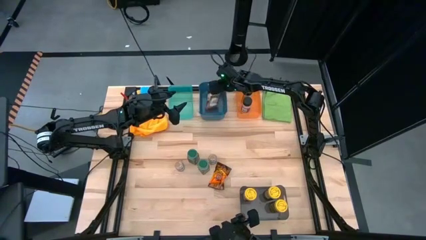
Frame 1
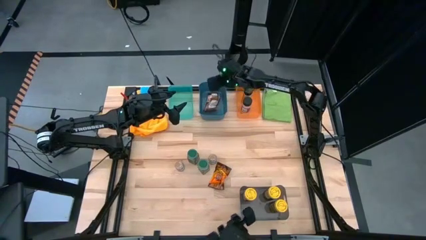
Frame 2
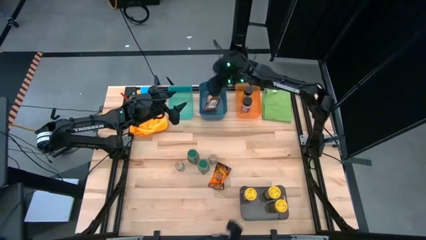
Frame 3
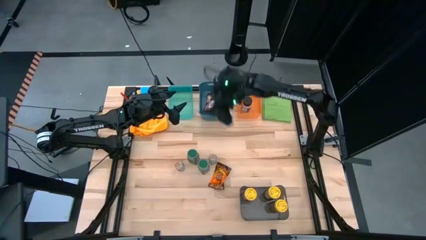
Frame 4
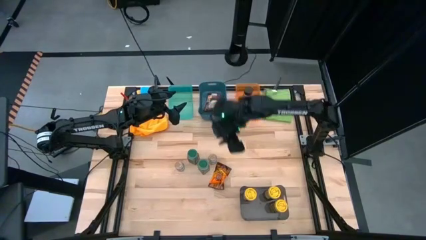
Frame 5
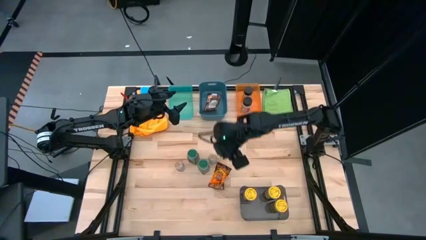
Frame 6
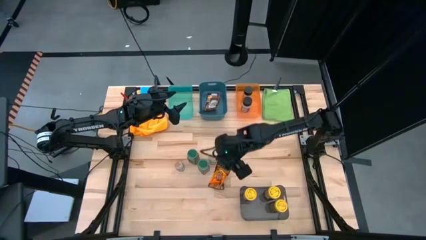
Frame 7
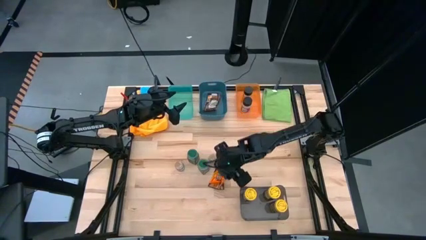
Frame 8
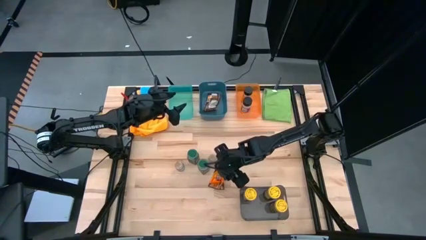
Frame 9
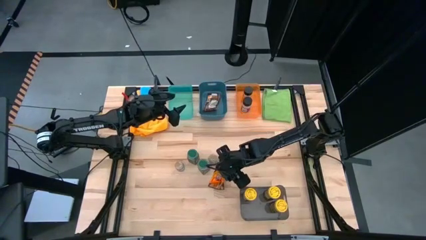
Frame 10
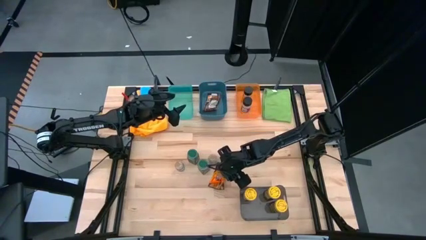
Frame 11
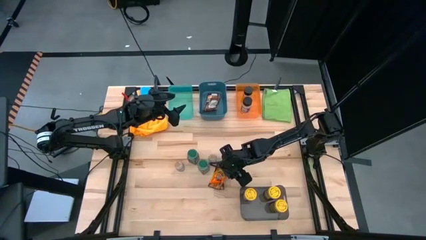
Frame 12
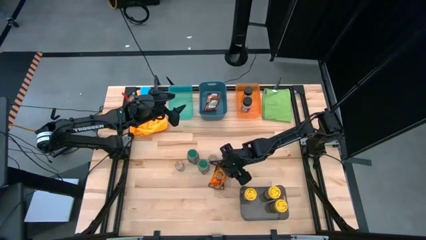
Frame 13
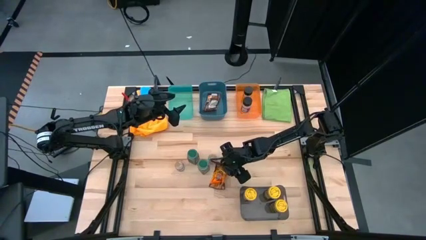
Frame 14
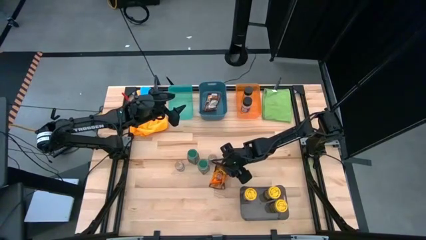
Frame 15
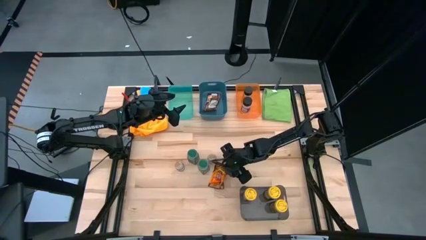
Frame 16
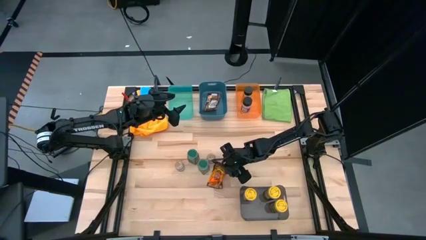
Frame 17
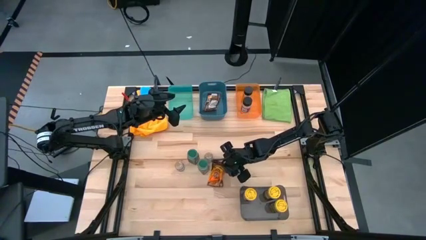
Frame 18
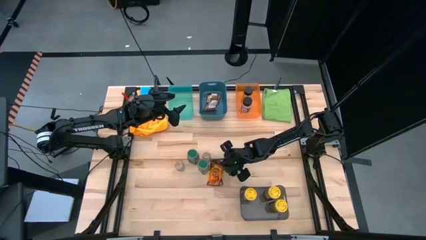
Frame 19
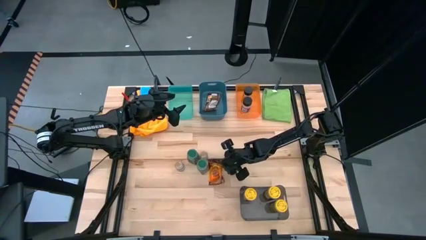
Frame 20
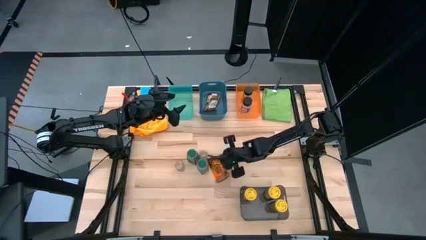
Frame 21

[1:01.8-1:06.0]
Task: Sort spices by type
Put the brown seasoning pack into the blue bin

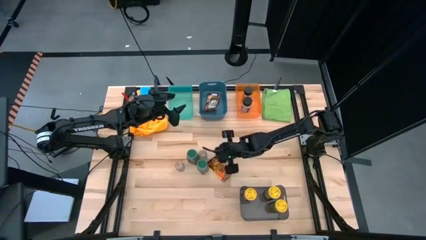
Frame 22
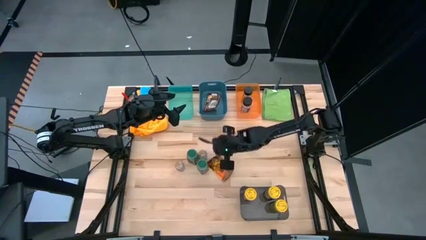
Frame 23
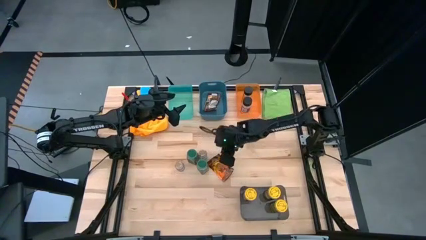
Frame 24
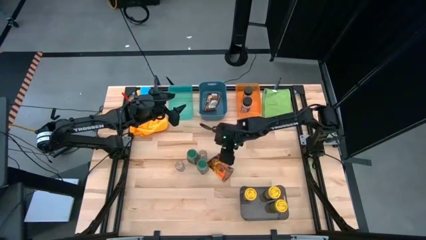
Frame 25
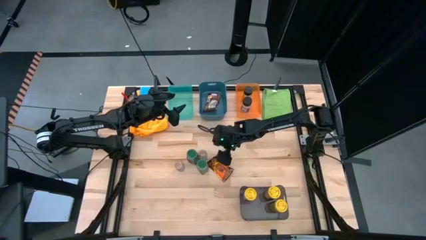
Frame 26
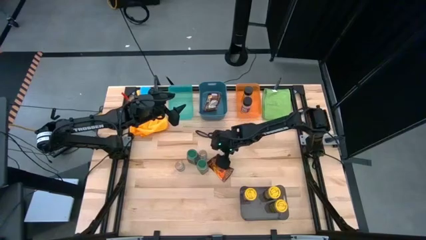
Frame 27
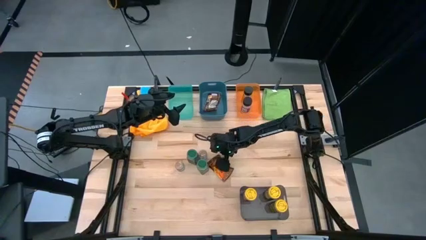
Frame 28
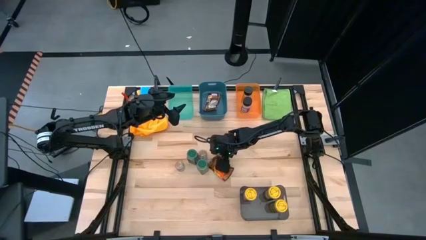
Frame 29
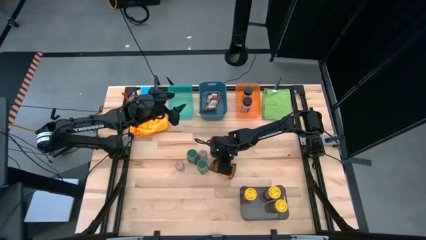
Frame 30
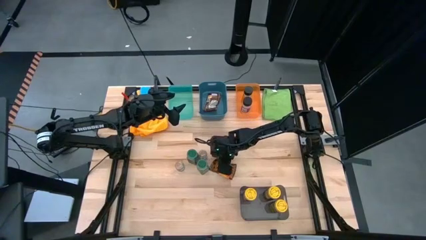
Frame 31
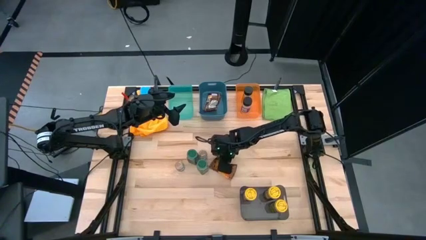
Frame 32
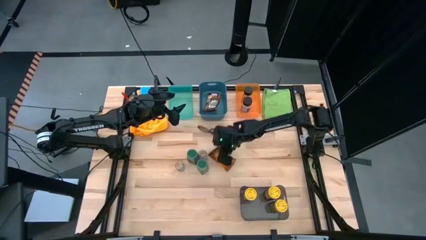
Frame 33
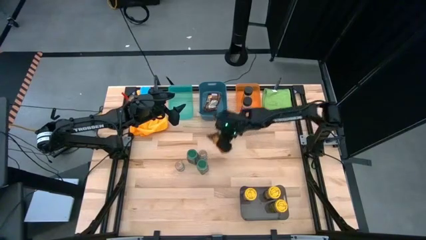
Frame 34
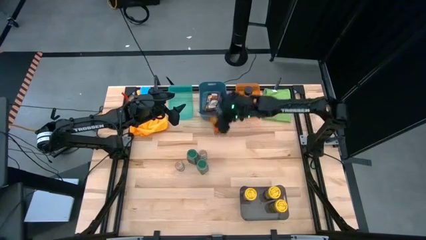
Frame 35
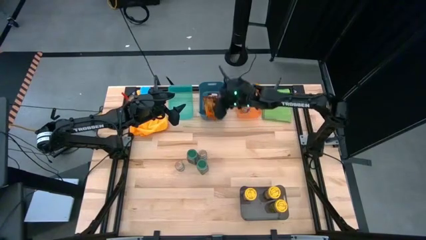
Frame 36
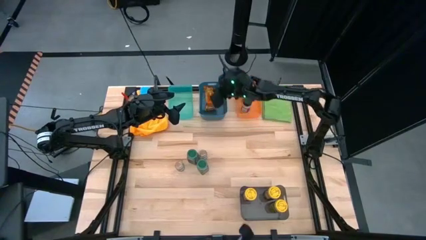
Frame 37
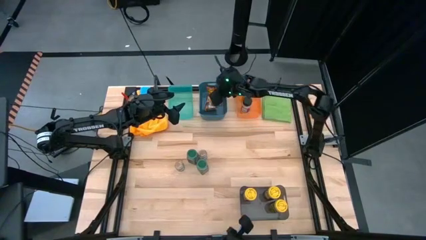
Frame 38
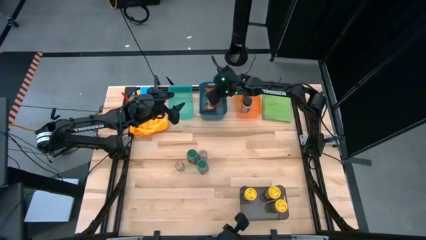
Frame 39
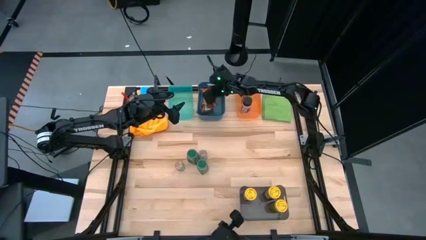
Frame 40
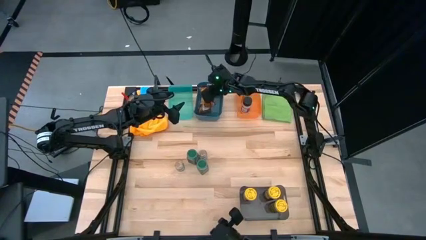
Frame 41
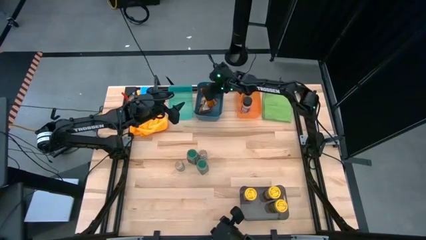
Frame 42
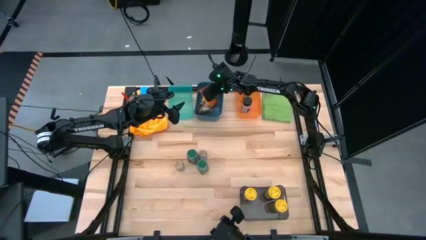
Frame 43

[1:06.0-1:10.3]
Put the orange seasoning pack into the blue bin

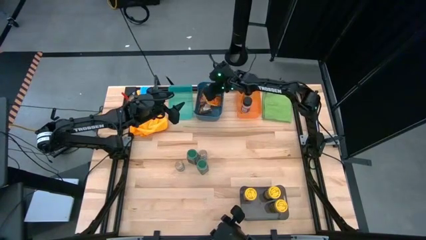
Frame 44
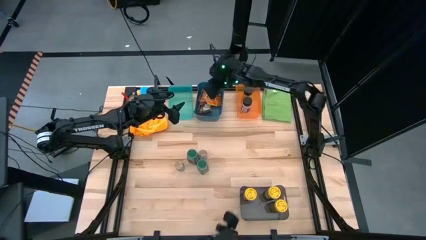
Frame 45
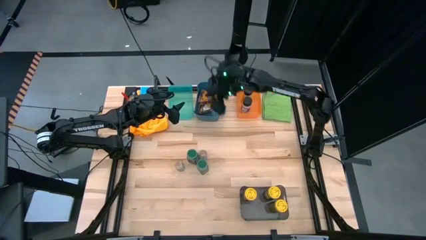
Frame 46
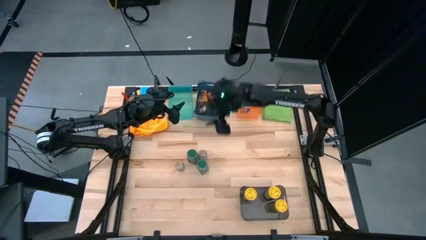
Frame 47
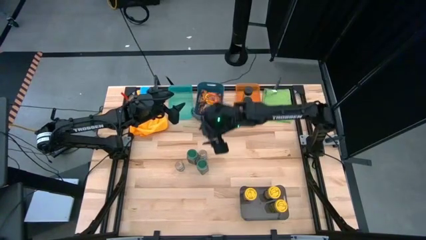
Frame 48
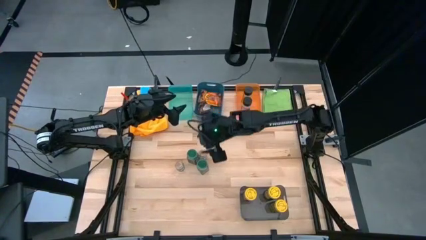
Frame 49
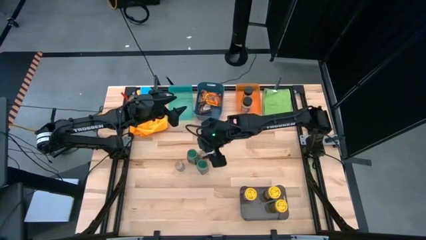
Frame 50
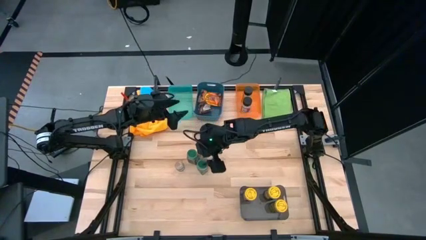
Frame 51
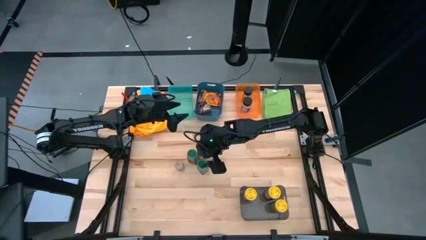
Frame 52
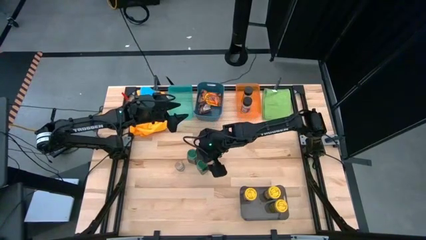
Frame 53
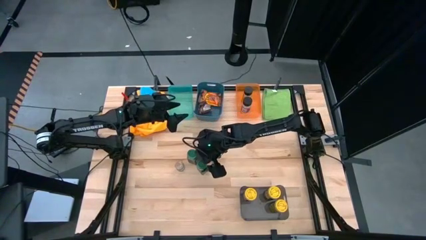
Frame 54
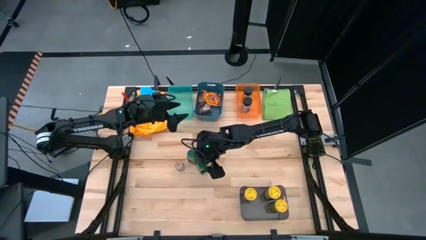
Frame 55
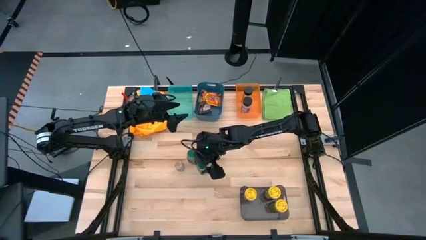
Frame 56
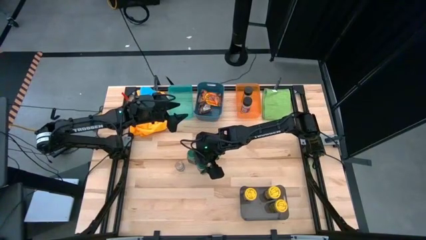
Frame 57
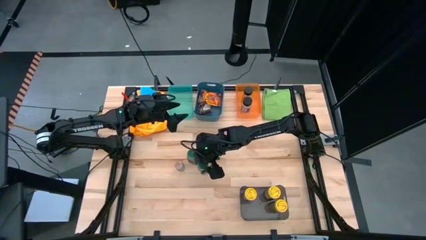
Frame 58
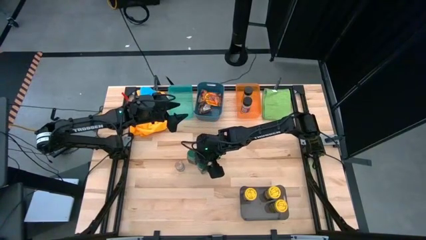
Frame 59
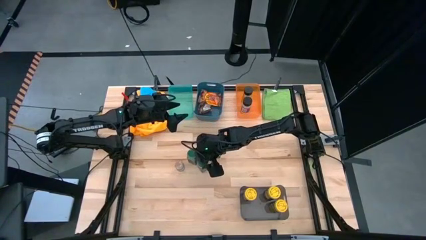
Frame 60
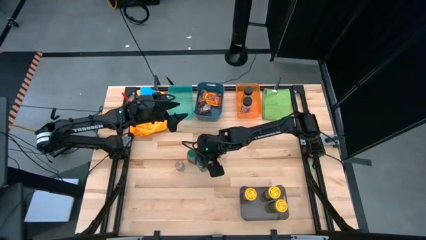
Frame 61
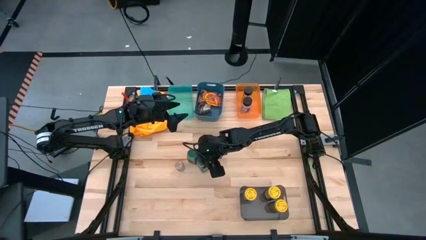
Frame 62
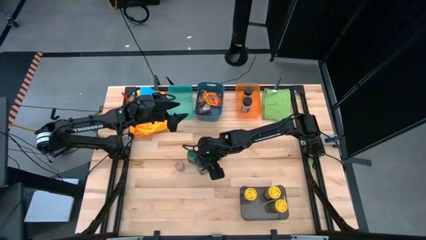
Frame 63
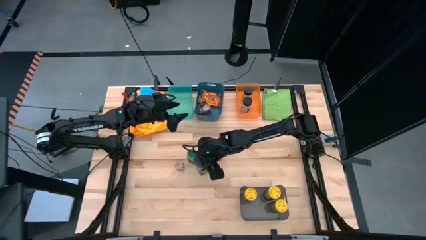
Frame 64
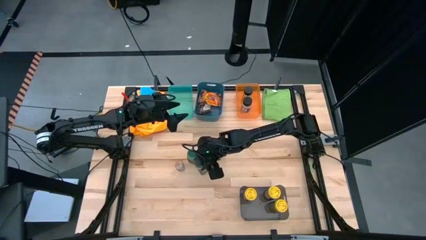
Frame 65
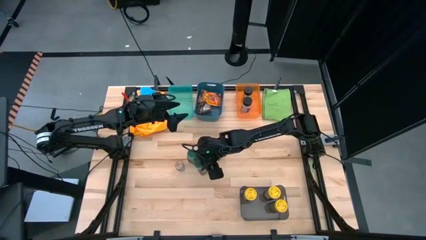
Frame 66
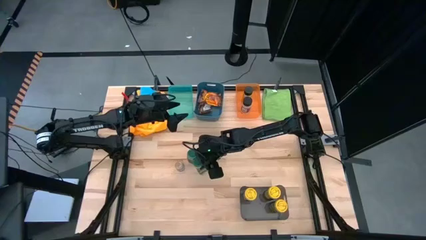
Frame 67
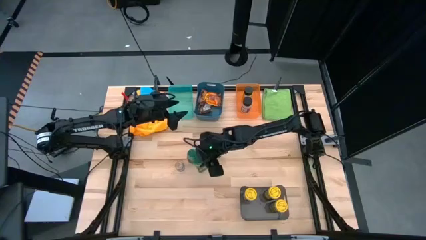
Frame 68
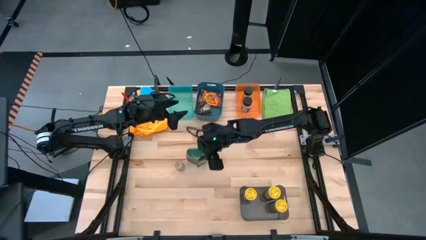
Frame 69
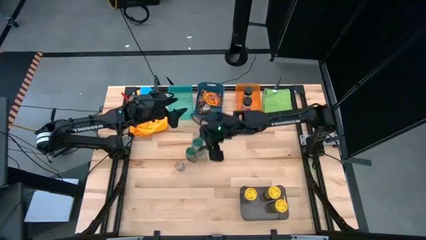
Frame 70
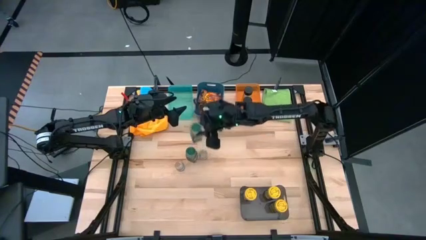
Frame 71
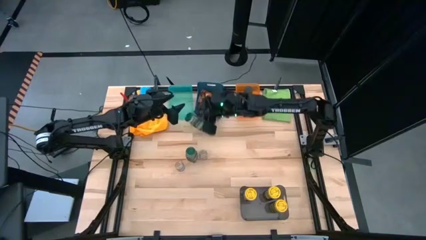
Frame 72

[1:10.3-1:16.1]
Put the right green seasoning bottle into the blue transparent bin

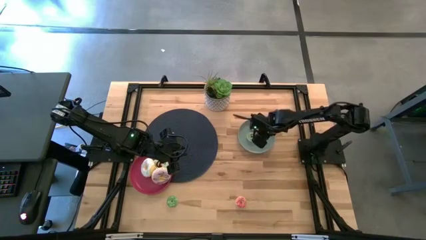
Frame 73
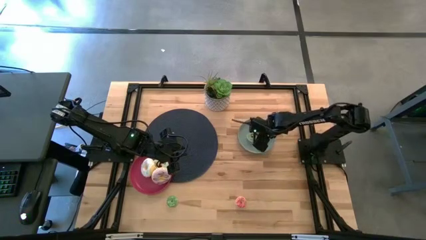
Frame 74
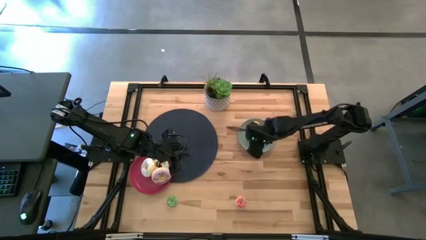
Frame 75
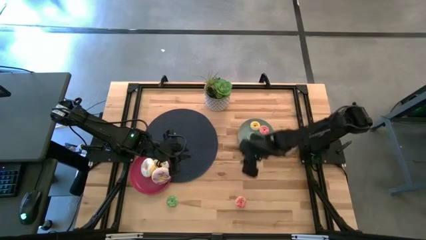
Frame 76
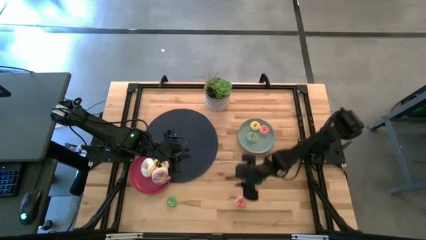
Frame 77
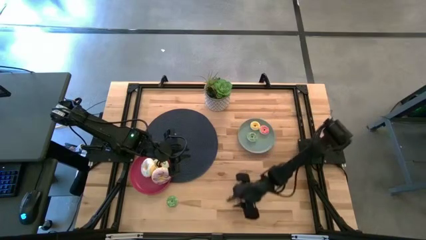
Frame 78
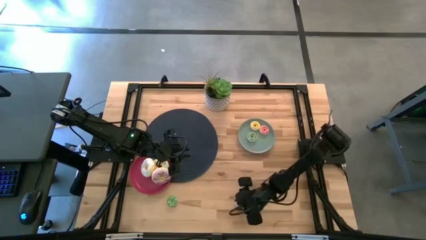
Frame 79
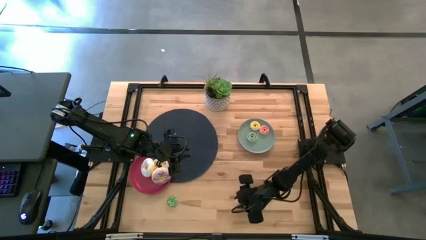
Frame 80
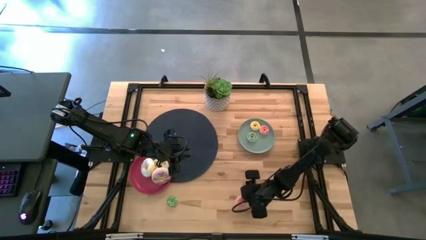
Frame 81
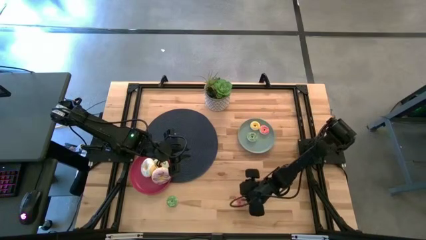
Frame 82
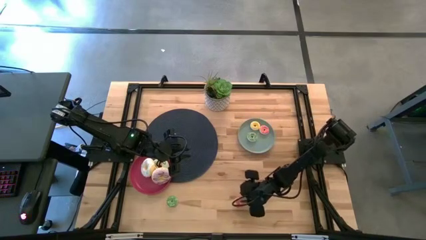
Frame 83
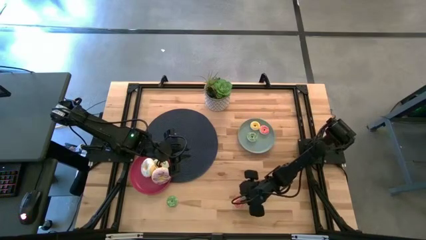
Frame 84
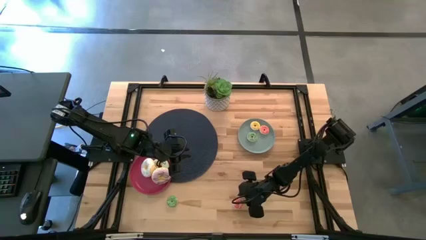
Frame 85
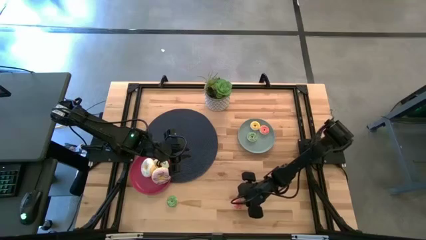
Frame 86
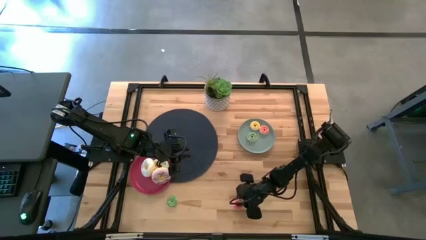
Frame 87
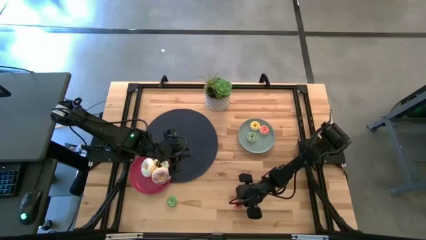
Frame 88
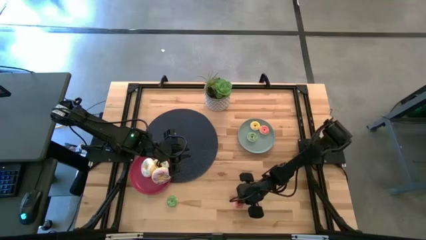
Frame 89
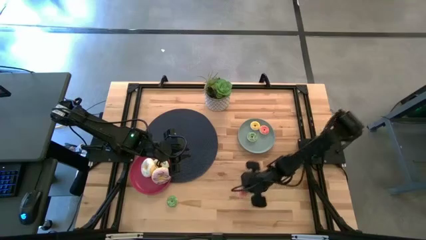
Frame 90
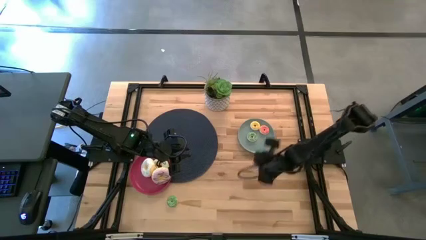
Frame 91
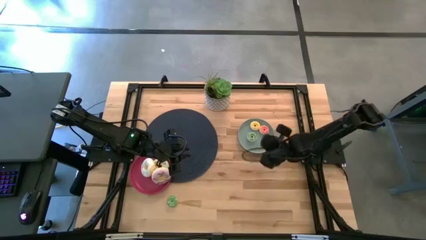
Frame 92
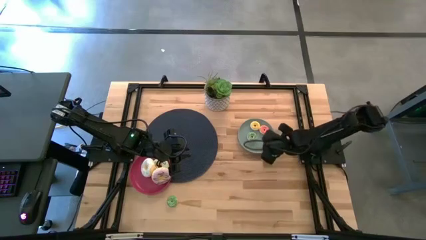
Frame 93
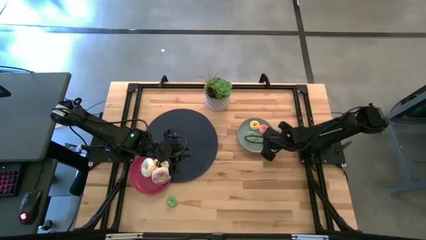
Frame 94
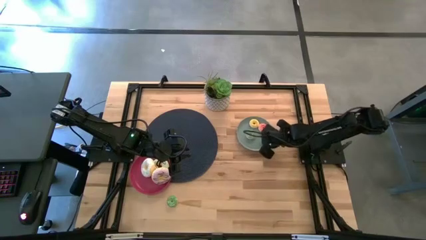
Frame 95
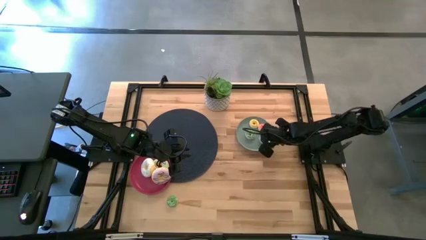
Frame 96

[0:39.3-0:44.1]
Task: Pick & Place donuts
Put the small pink donut on the blue plate
